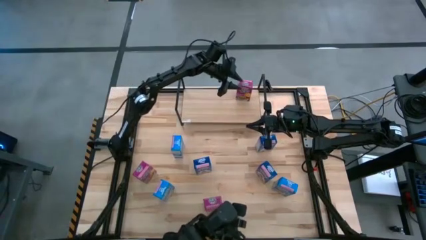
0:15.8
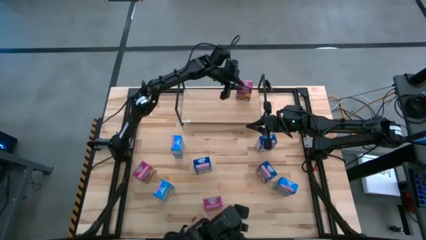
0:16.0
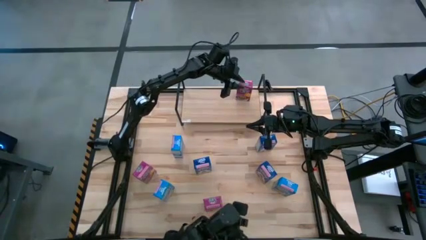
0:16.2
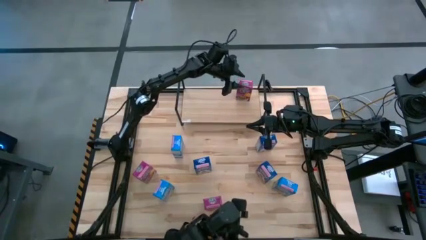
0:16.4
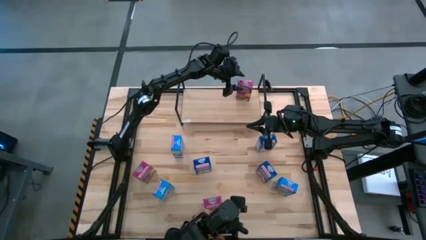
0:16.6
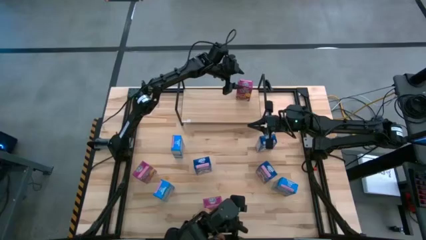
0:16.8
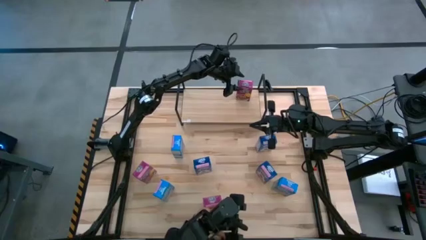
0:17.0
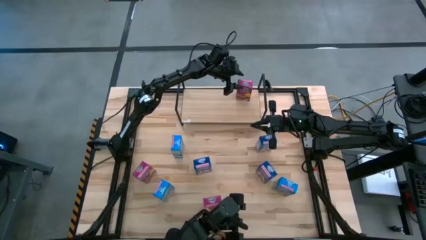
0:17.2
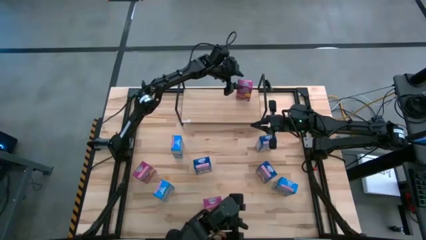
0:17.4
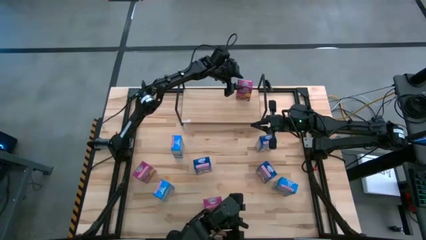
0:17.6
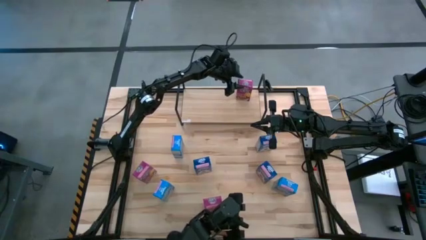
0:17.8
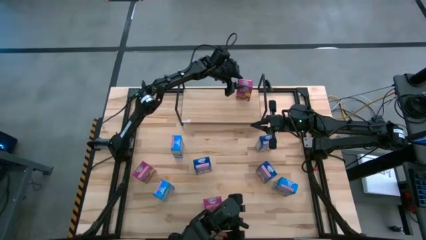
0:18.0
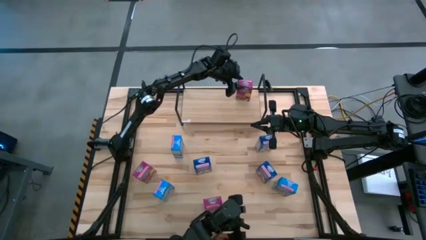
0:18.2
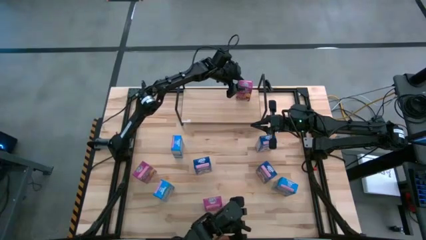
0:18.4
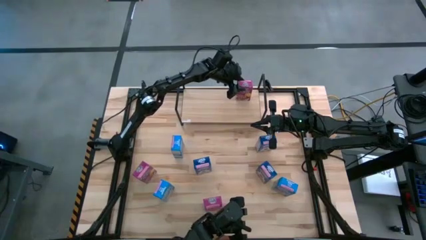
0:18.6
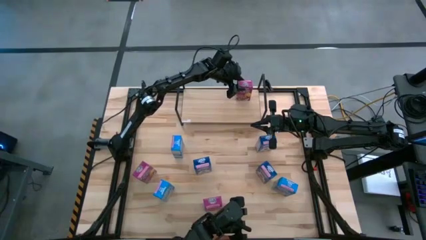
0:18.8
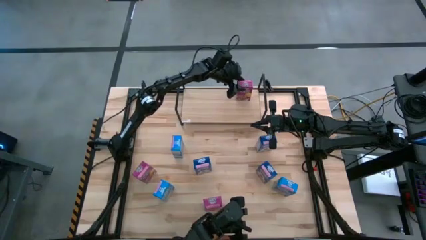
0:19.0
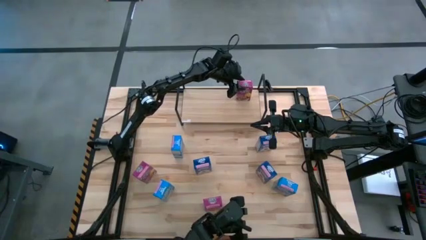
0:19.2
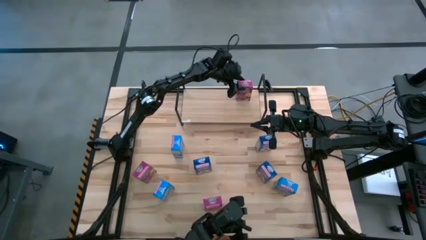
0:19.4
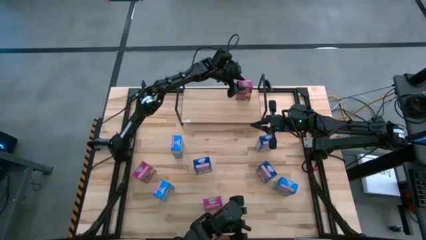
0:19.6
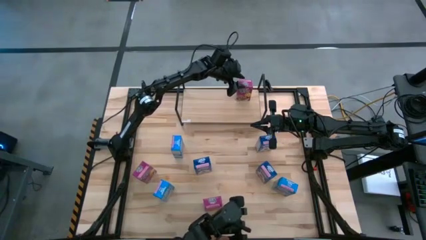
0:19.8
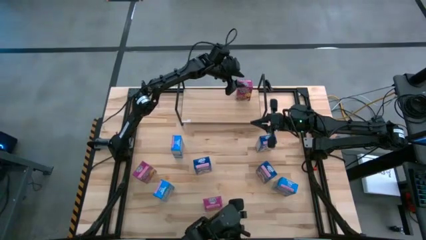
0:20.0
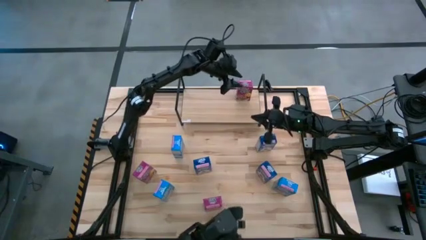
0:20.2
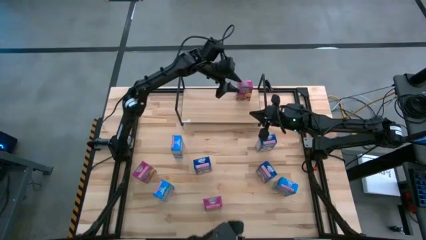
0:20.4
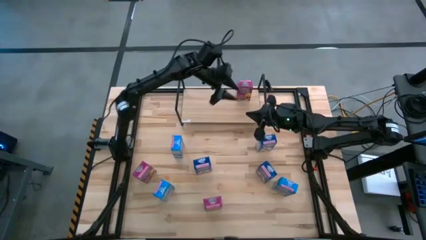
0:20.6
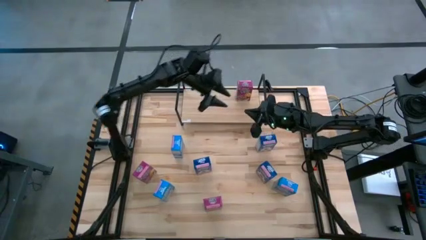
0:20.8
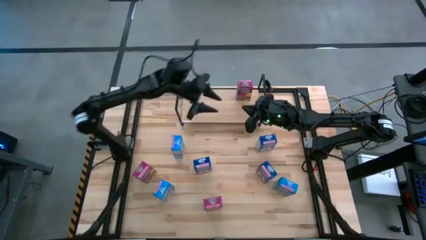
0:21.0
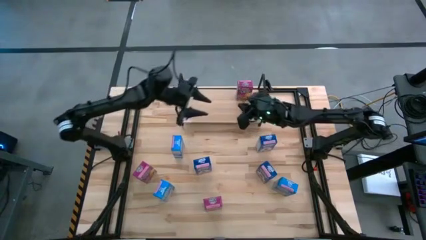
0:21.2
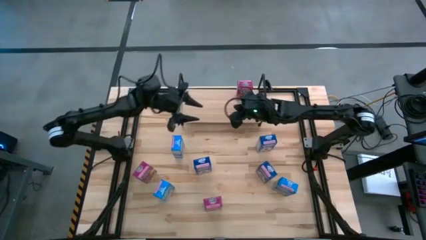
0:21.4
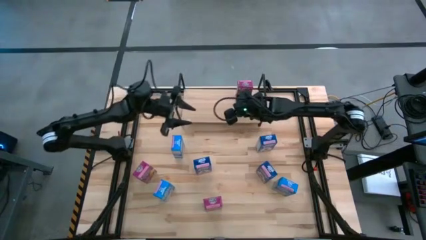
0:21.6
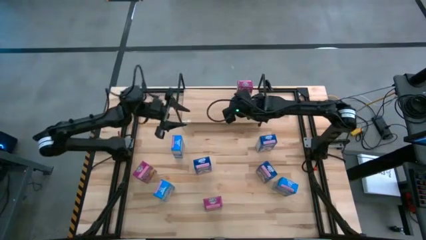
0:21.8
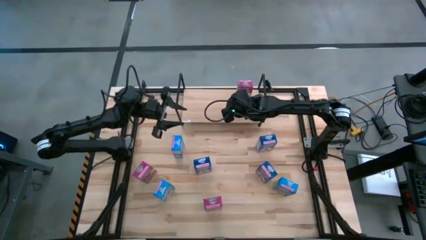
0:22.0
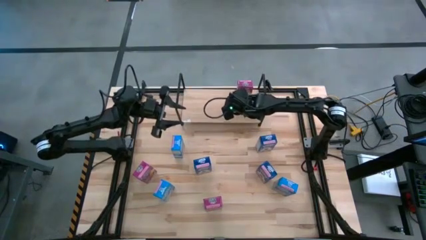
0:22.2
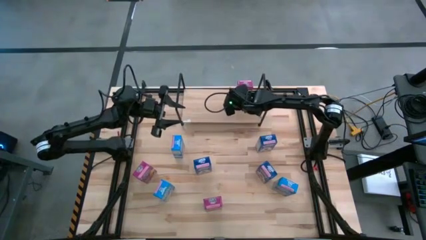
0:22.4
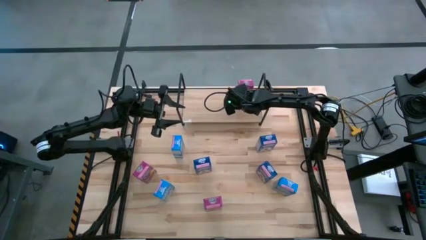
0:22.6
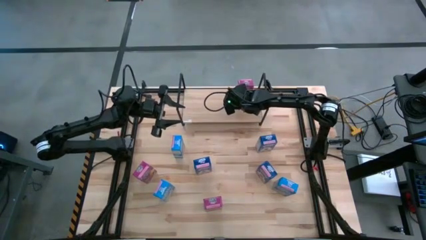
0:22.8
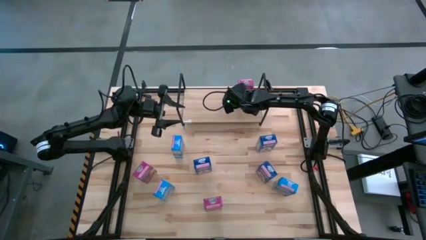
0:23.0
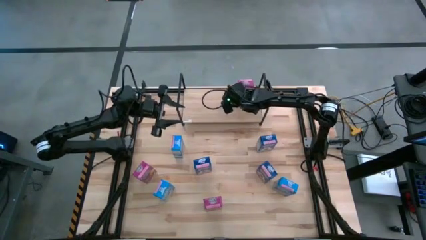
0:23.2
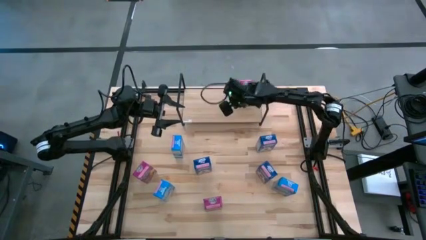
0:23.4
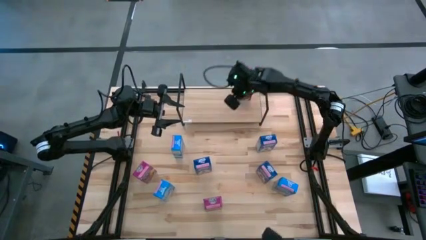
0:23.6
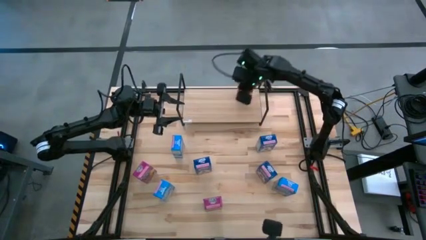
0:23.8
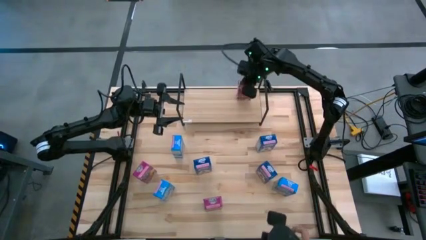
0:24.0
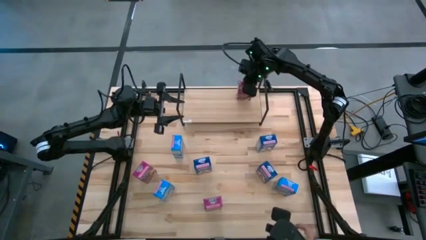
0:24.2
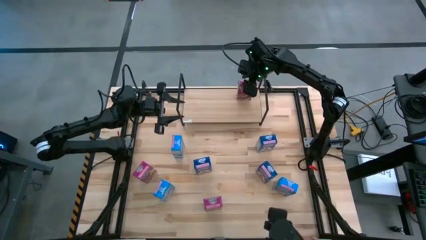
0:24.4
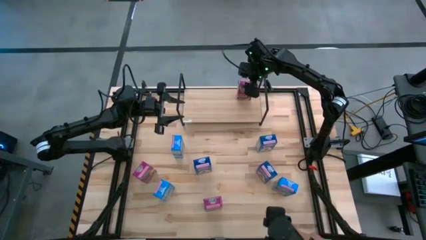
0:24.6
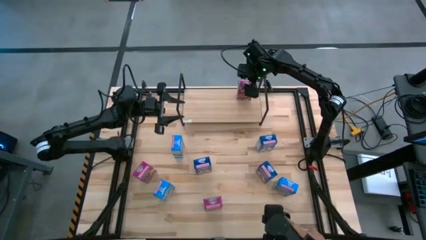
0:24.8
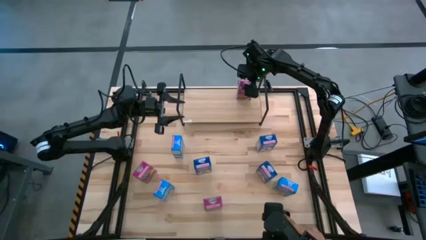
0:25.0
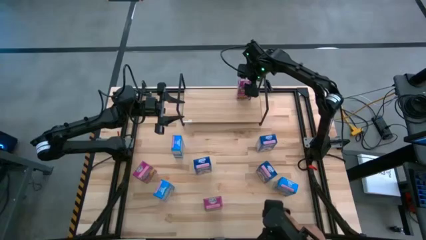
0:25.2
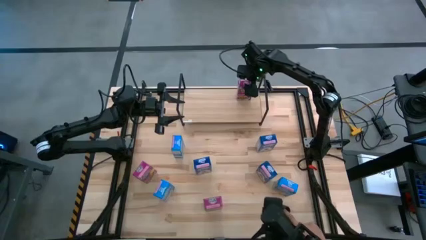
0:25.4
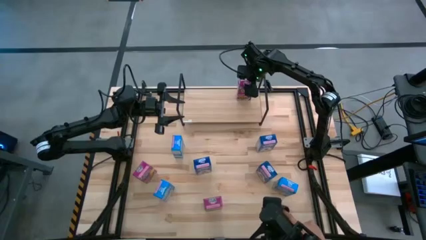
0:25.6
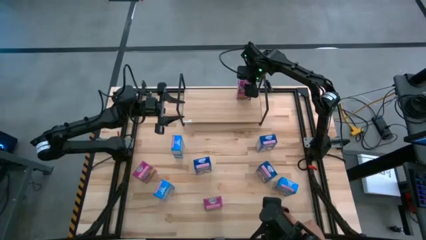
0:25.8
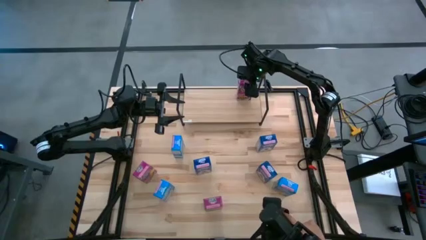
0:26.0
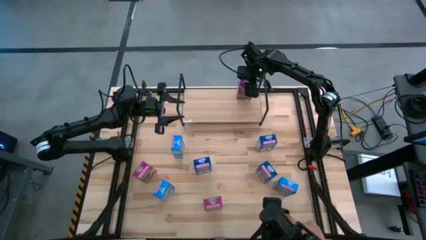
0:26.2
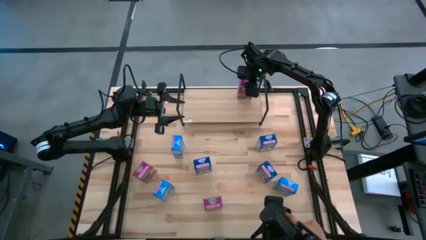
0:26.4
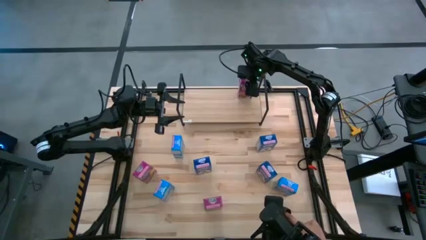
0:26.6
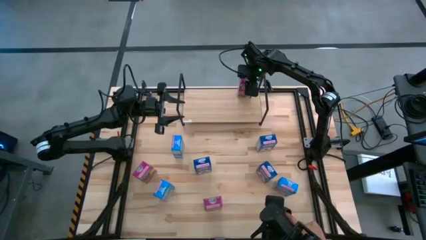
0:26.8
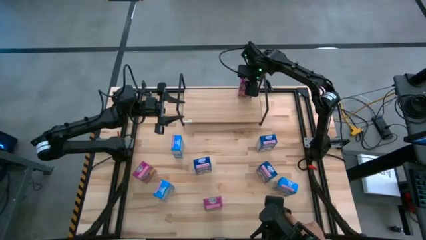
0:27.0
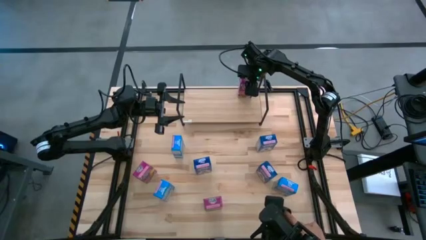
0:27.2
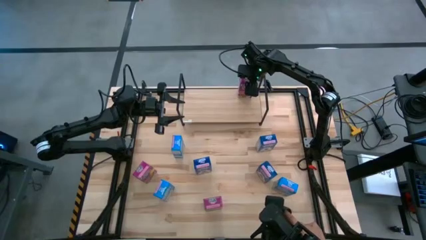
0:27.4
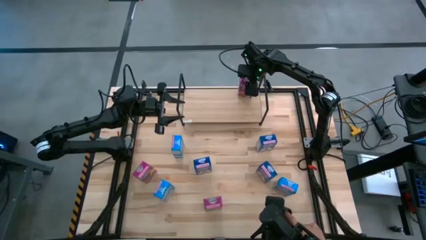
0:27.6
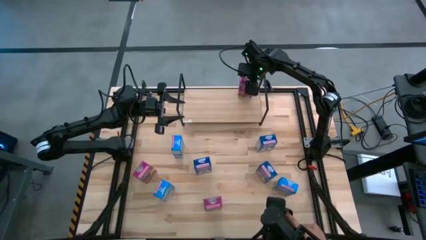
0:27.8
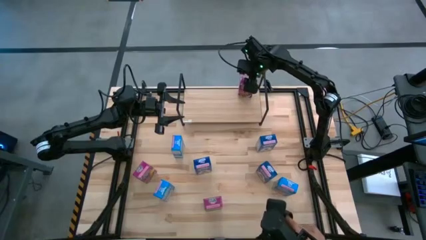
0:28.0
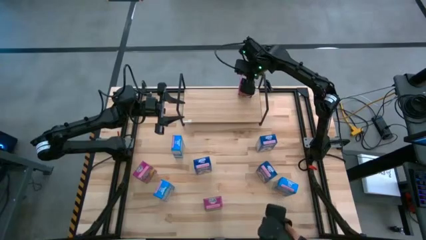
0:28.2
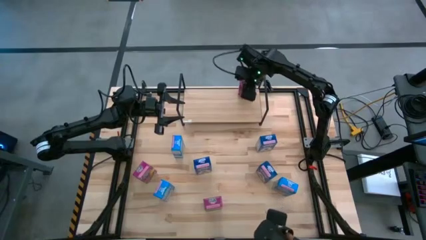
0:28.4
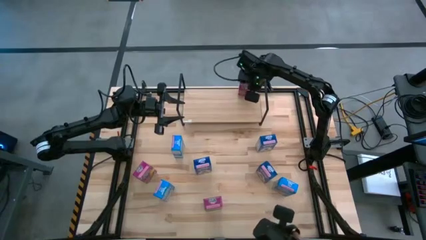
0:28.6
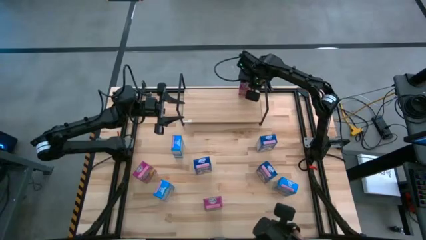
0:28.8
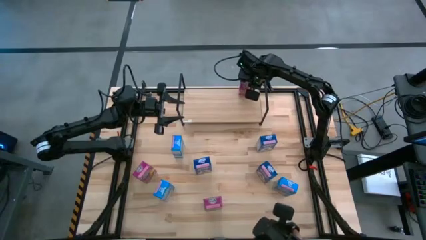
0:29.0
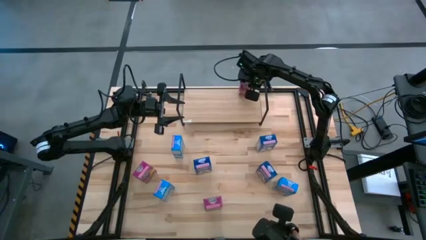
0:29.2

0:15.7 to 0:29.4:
Task: Stack cereal on shelf
Put the top purple cereal box on the shelf Adjust the purple cereal box on the shelf

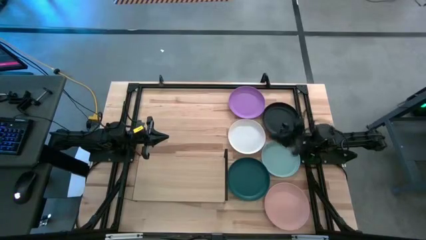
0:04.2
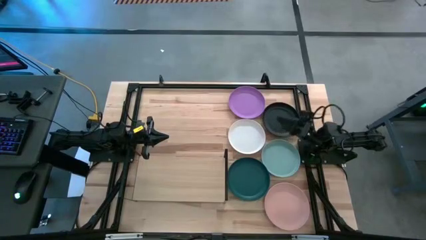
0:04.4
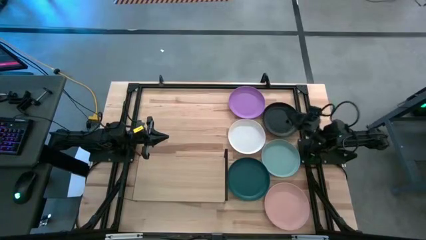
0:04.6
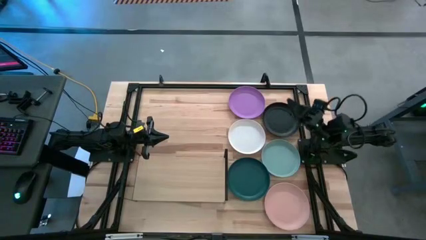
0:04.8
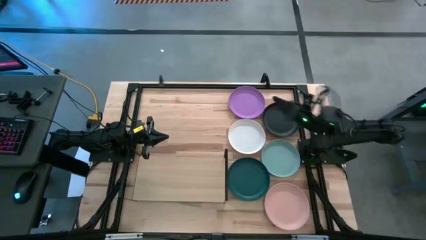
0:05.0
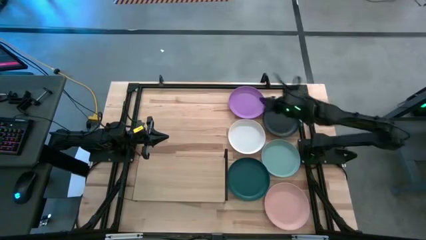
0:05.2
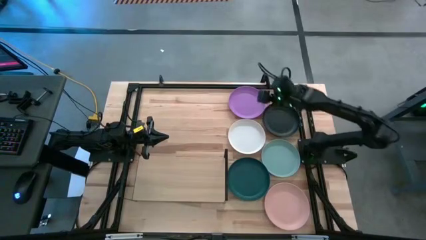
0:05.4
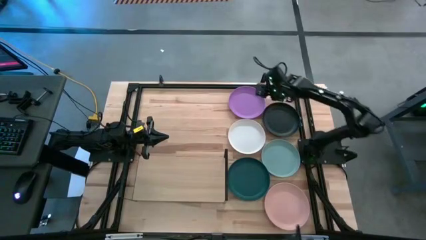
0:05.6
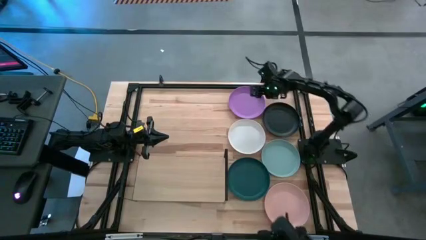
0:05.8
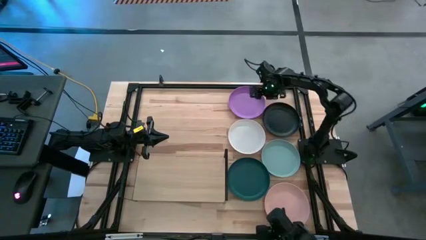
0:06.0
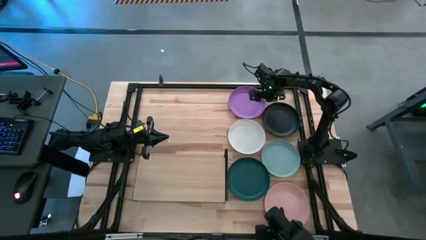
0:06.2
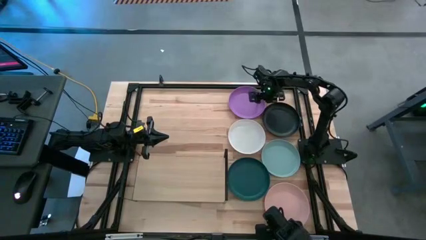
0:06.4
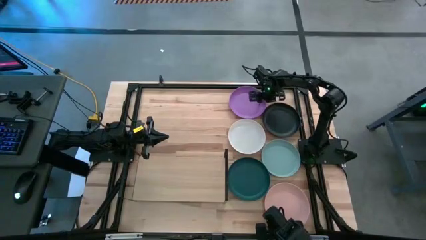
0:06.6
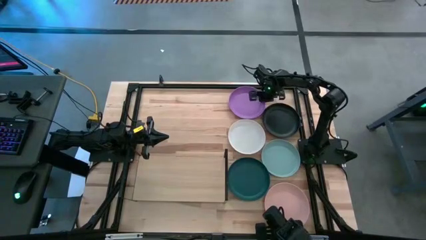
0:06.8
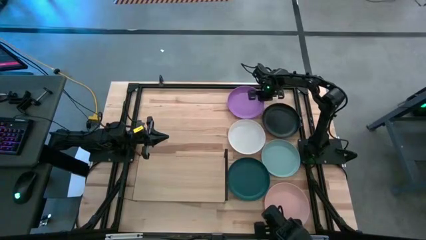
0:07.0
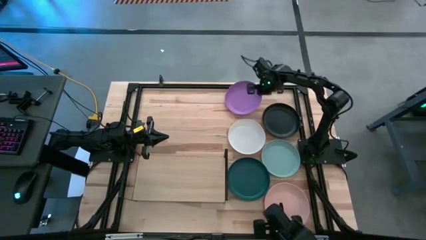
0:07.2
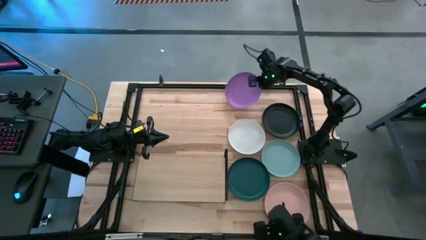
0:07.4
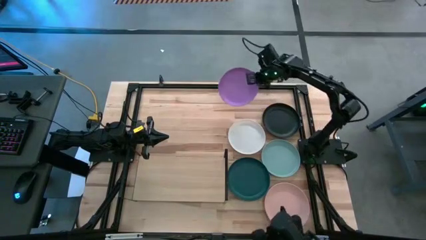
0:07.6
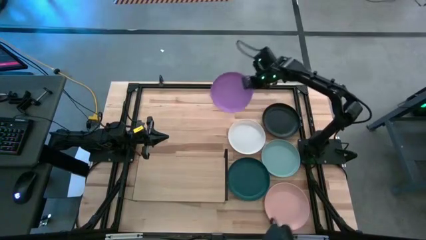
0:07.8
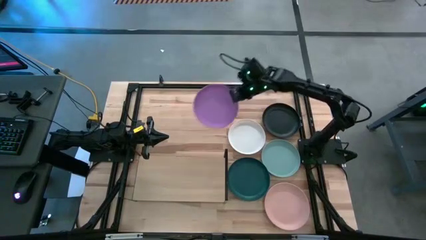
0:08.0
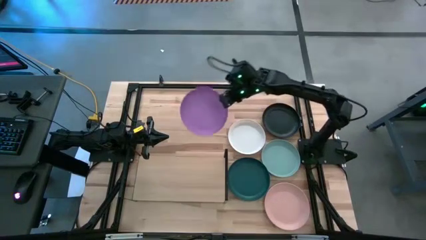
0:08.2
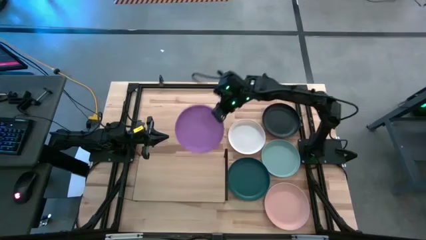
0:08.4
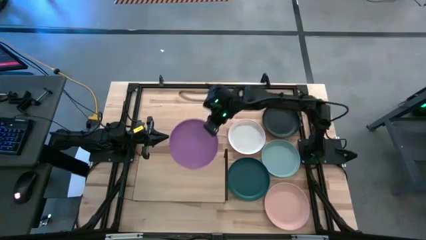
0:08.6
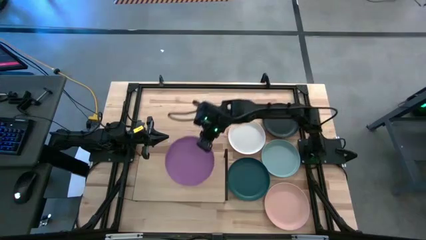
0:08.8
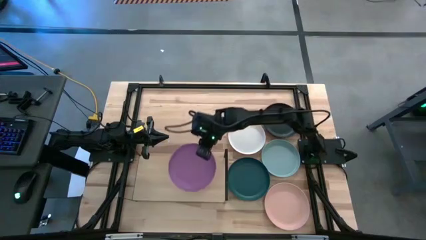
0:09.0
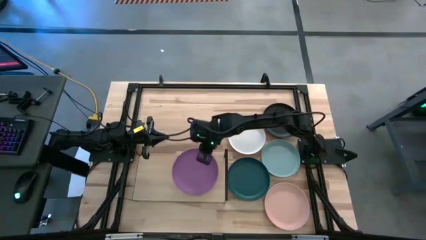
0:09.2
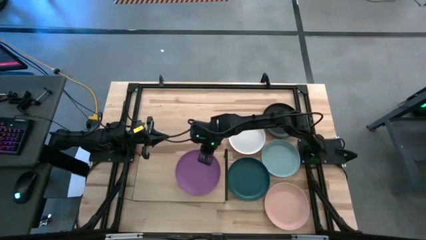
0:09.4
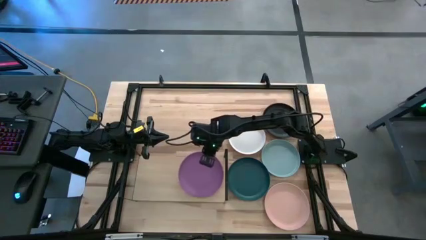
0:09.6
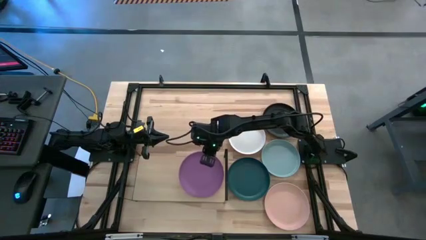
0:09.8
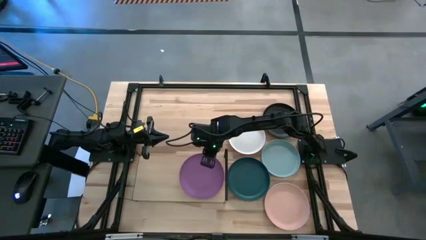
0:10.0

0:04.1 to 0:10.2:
Task: Place and stack plates onto a shelf
Put the violet plate on the shelf
